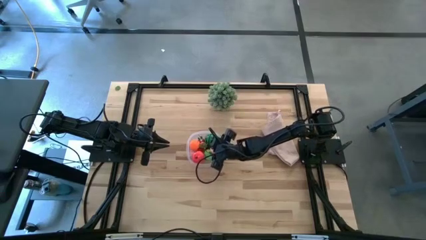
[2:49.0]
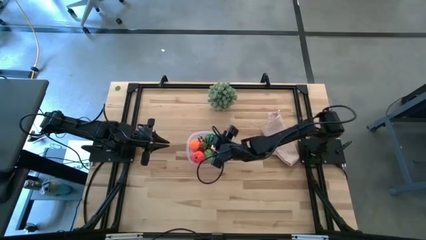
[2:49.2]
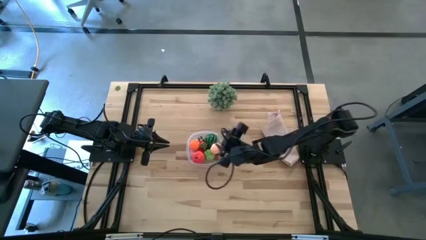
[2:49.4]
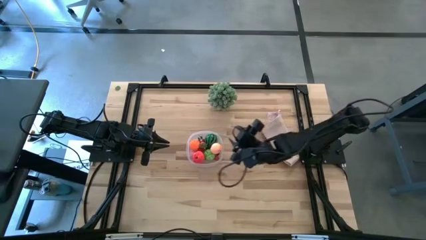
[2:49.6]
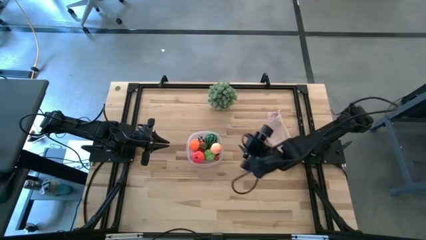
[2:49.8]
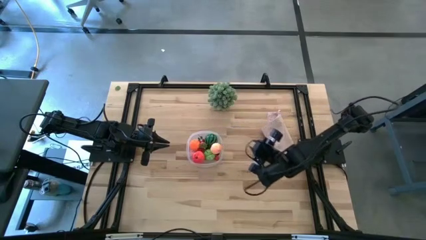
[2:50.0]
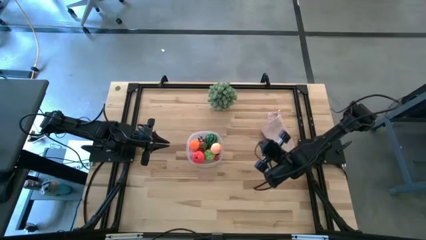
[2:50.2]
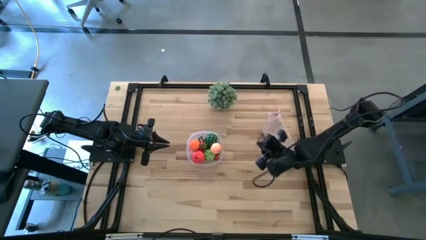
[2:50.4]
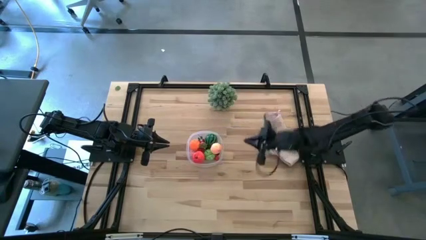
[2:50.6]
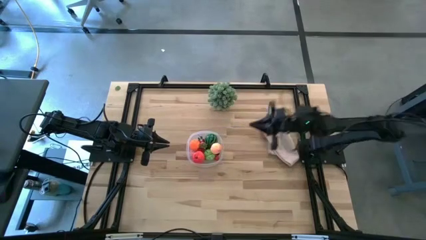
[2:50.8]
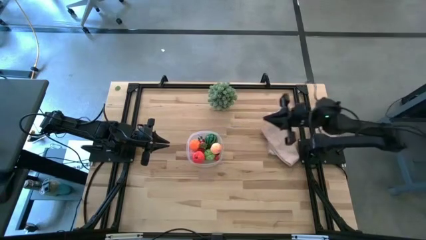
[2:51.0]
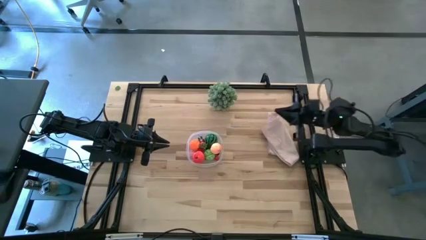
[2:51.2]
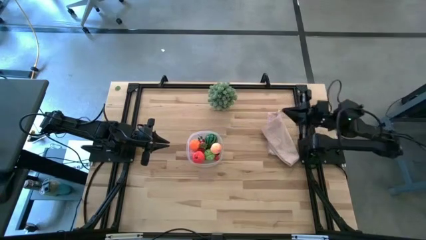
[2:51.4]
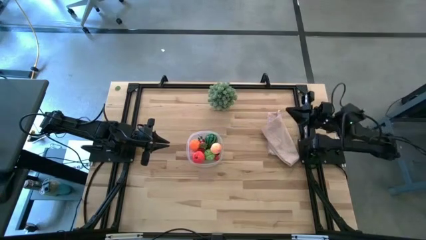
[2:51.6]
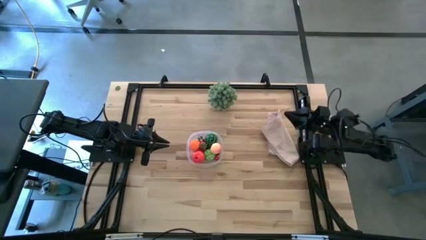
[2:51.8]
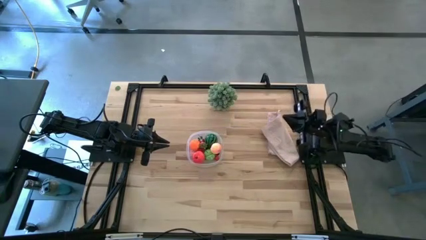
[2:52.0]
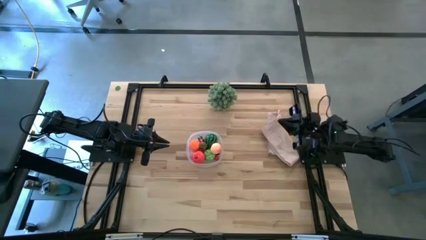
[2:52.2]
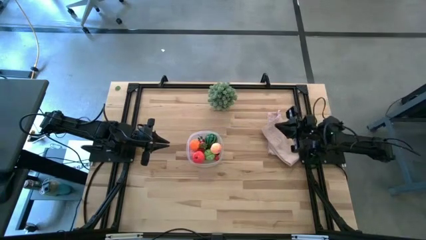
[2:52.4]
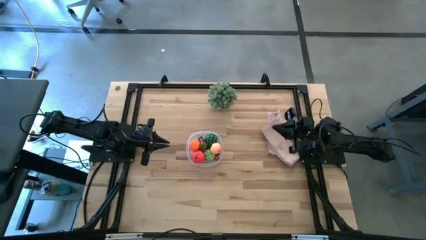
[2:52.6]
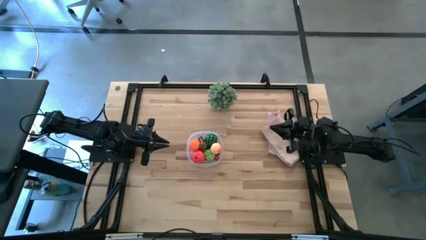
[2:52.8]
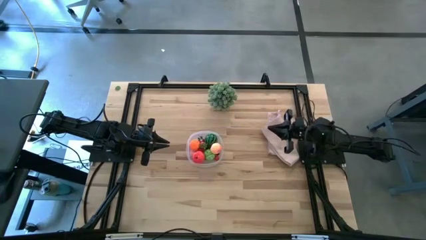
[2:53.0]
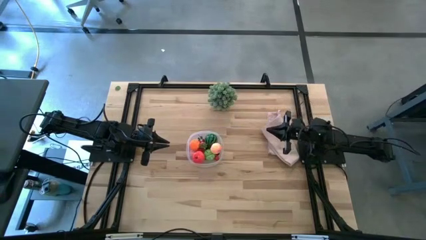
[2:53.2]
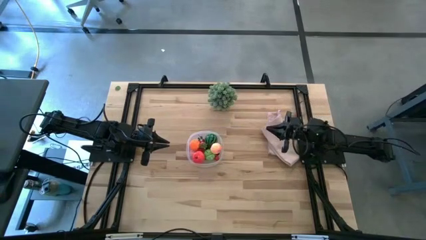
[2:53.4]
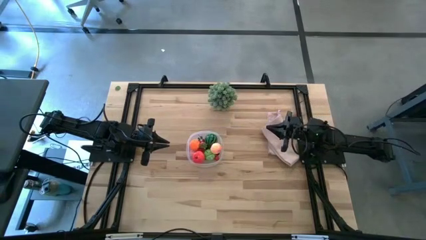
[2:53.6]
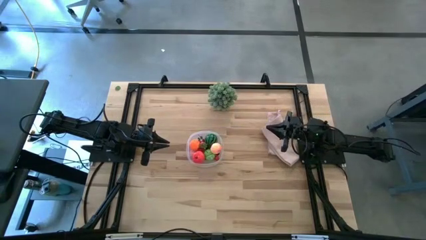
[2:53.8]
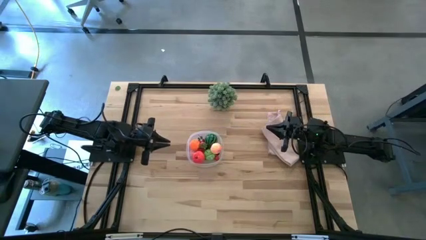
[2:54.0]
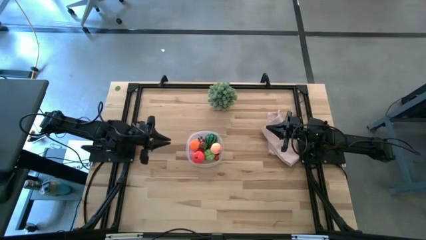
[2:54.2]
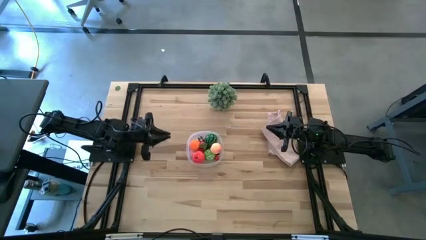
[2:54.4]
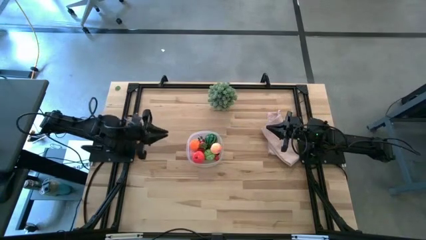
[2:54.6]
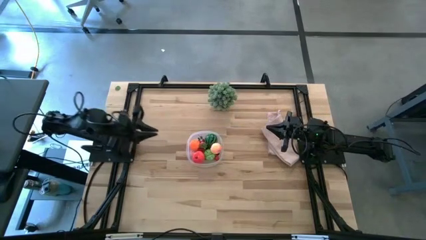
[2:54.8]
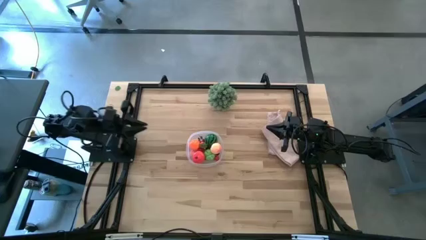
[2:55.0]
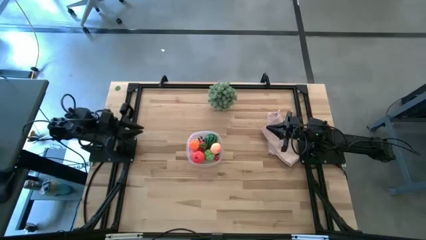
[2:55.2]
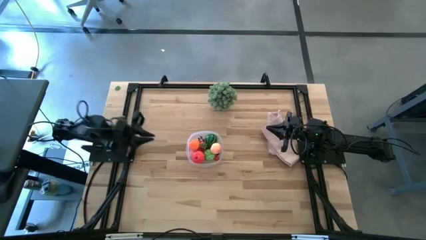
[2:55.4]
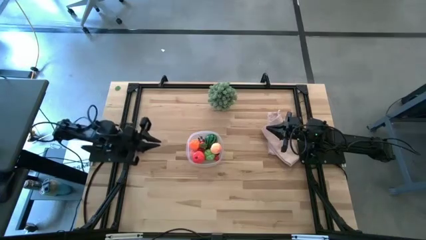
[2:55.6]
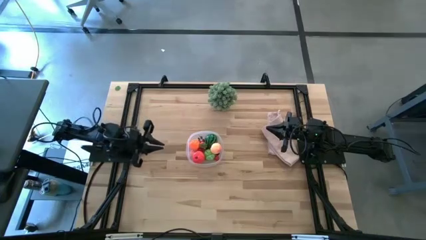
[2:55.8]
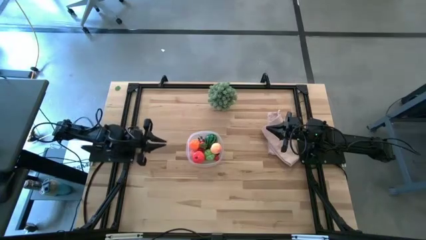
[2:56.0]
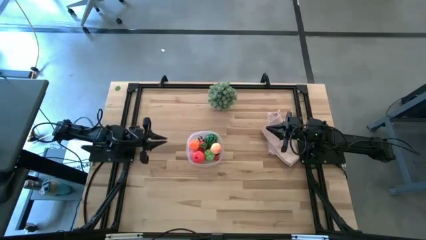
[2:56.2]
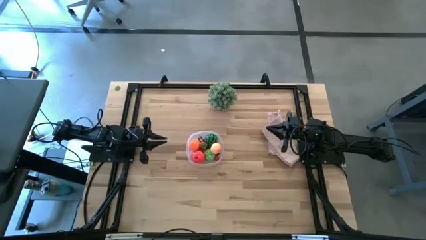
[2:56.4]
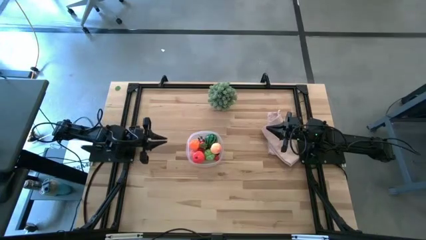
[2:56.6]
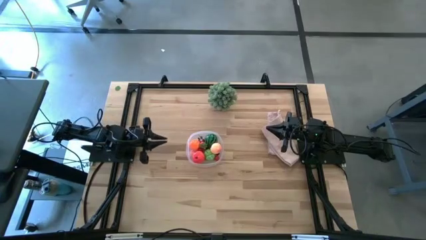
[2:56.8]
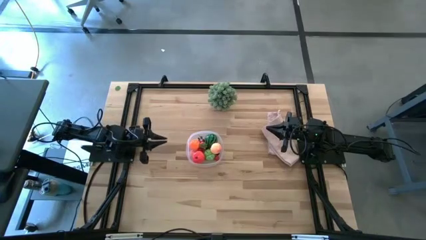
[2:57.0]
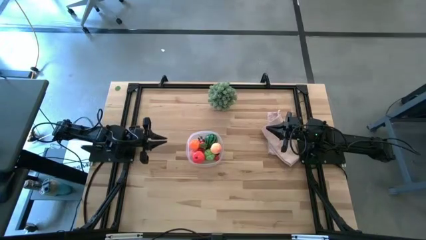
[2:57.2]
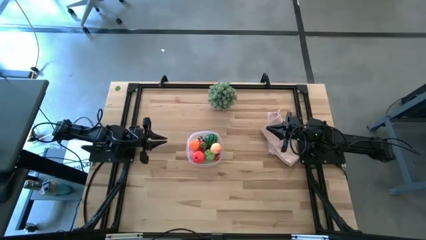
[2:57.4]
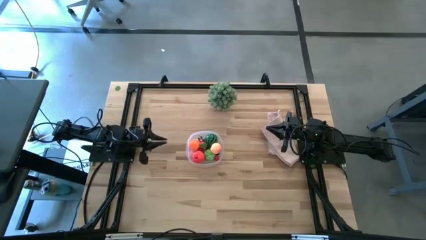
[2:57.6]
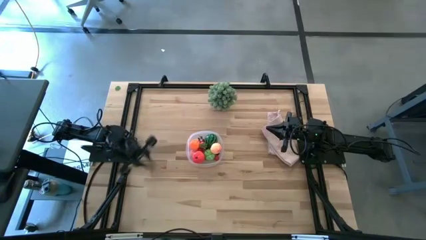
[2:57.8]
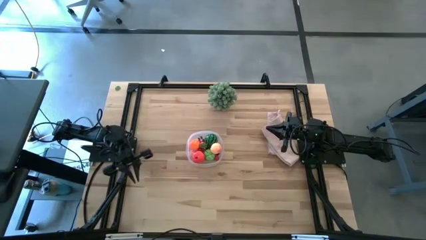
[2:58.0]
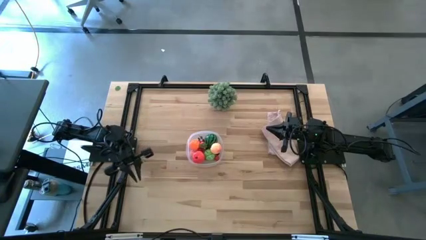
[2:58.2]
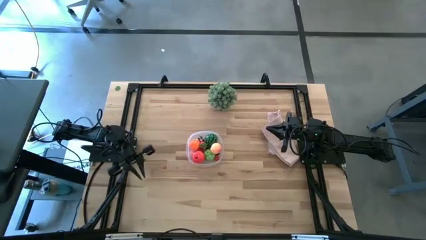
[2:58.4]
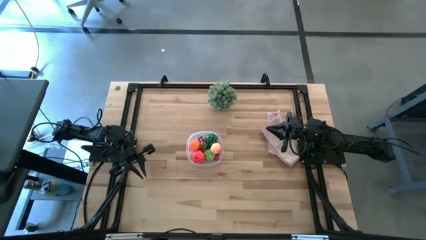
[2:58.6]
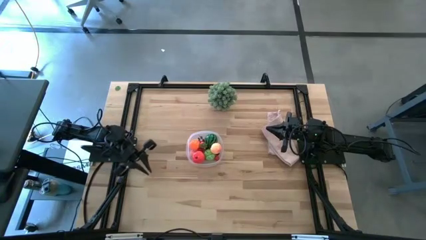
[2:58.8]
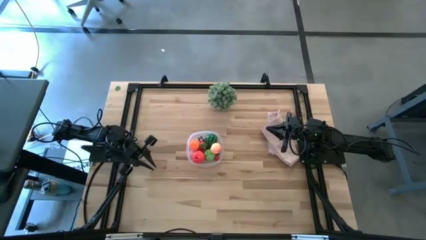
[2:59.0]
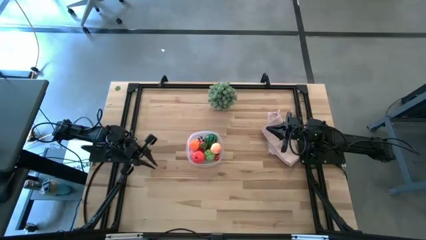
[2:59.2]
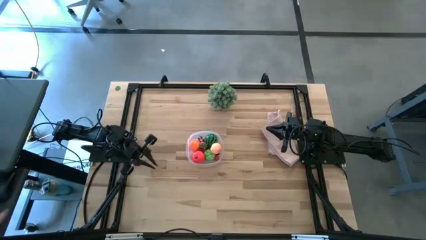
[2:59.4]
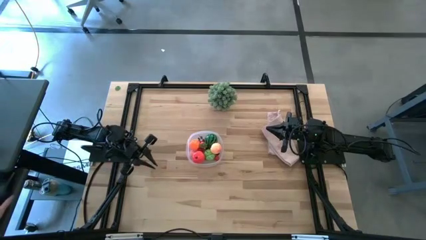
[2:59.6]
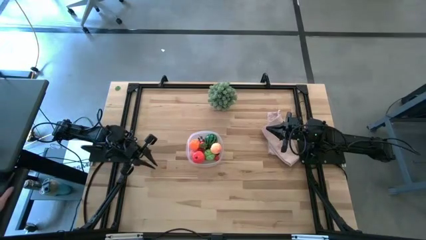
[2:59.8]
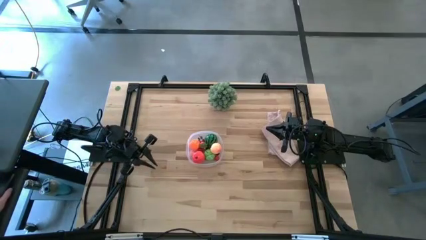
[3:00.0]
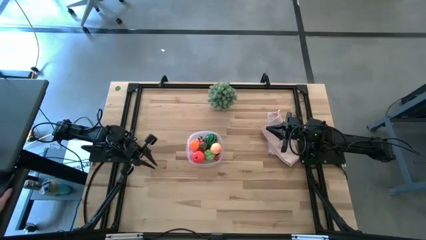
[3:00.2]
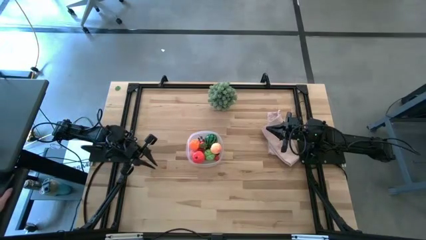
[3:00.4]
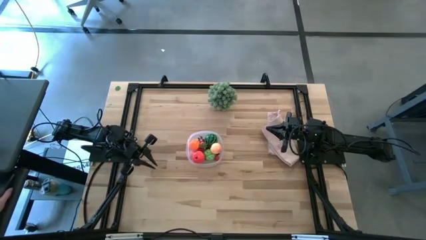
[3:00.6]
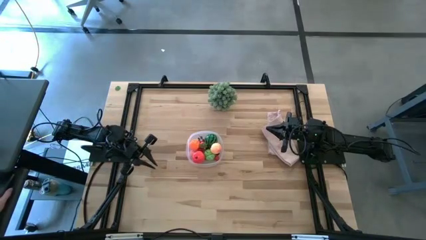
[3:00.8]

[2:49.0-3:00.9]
Task: Pick and placing Produce into tupperware
Return to Home Position

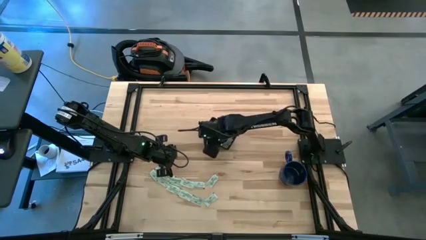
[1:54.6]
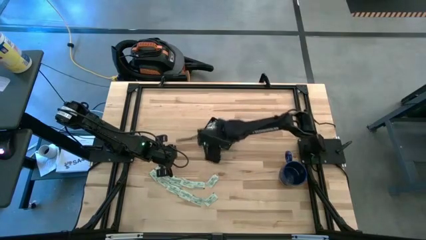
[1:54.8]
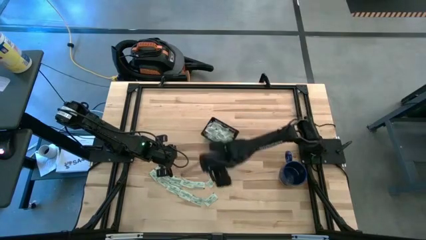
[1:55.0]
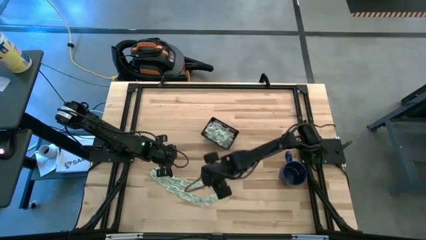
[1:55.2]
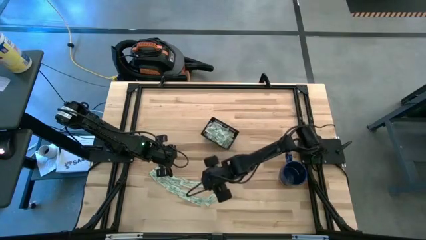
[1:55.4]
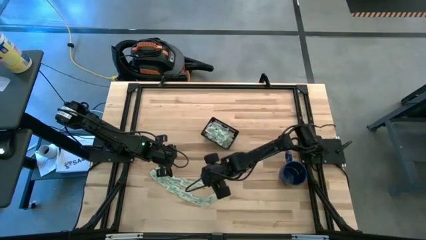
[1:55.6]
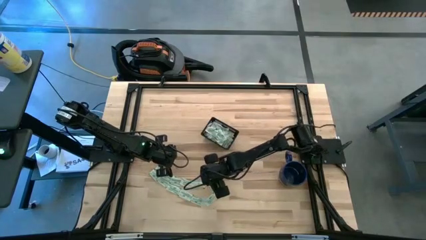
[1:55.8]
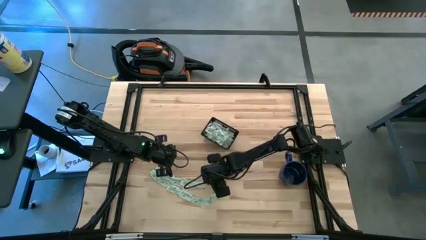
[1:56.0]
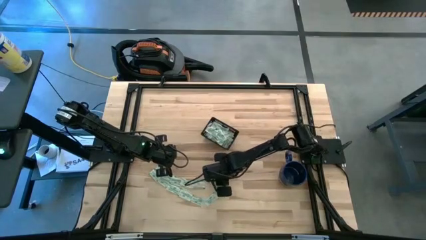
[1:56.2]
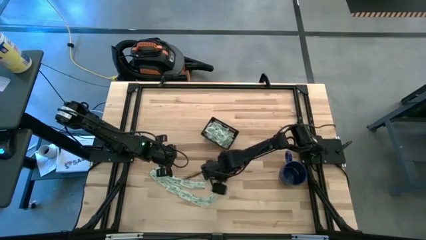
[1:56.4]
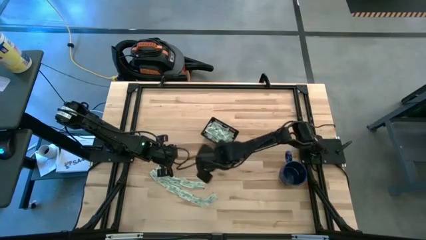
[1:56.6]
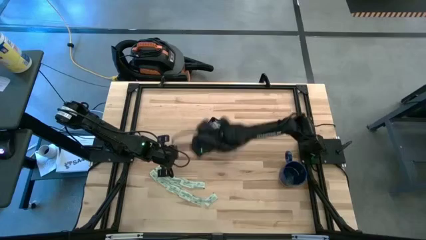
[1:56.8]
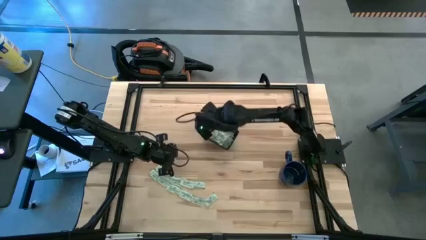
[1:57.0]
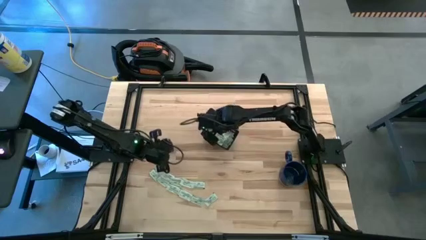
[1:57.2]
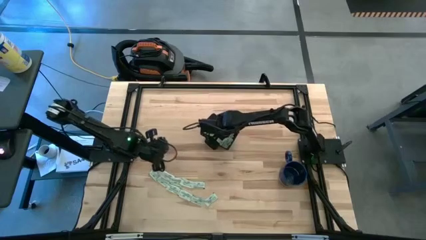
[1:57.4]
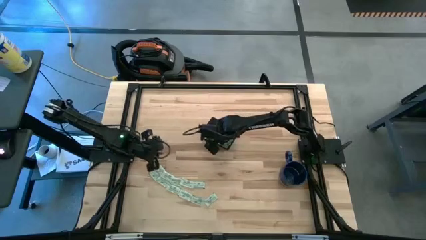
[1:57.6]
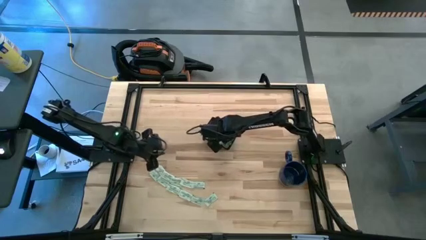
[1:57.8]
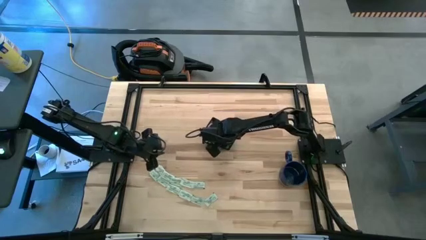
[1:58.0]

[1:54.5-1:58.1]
Task: Pick and place Stevia / Truvia into bins
Put the stevia packet into the black bin

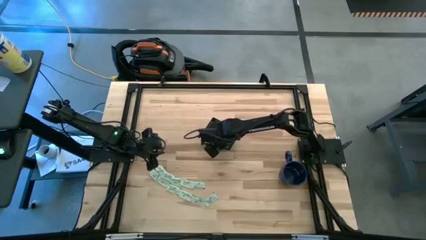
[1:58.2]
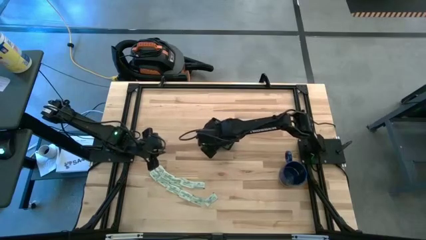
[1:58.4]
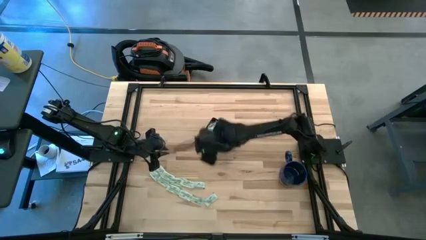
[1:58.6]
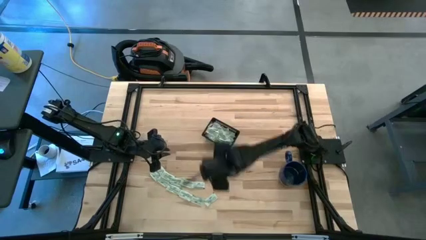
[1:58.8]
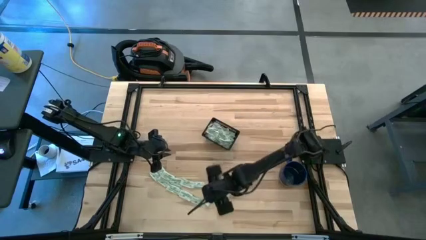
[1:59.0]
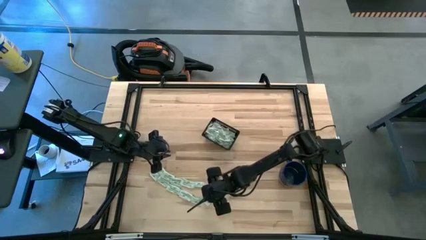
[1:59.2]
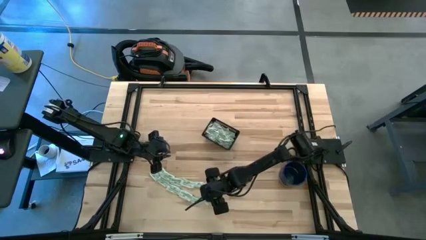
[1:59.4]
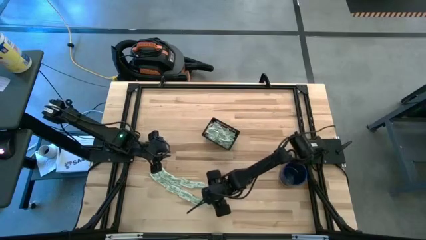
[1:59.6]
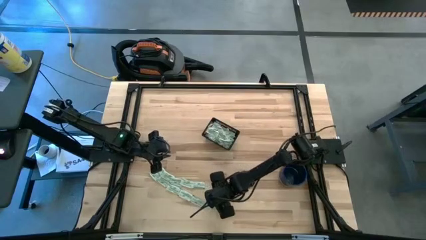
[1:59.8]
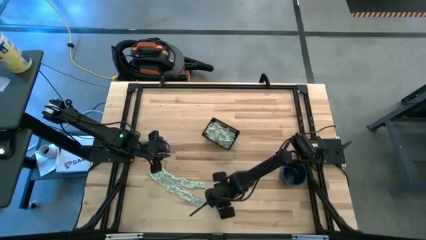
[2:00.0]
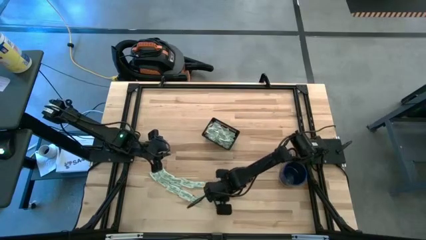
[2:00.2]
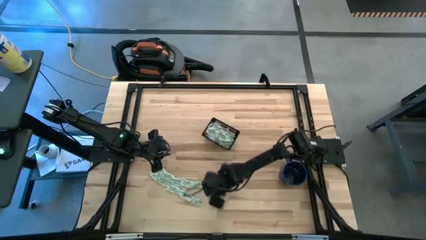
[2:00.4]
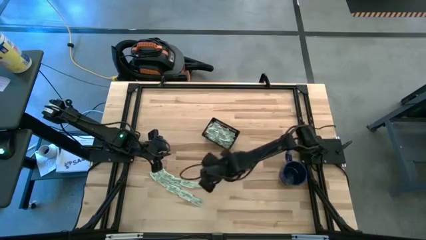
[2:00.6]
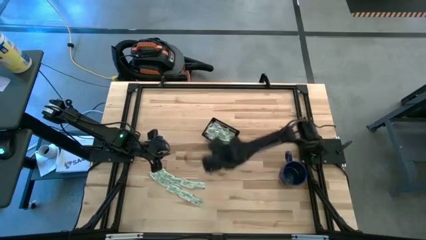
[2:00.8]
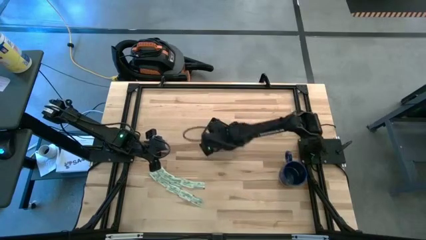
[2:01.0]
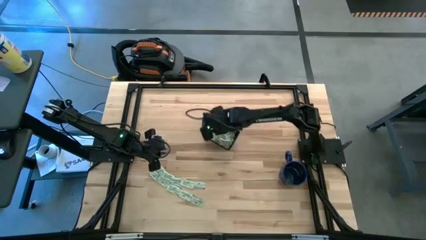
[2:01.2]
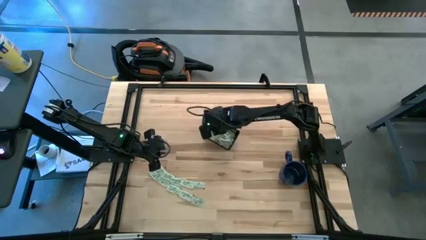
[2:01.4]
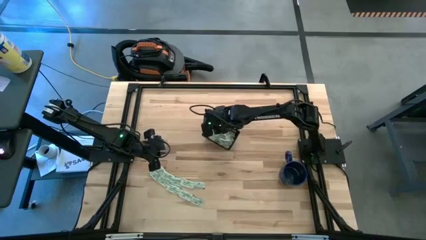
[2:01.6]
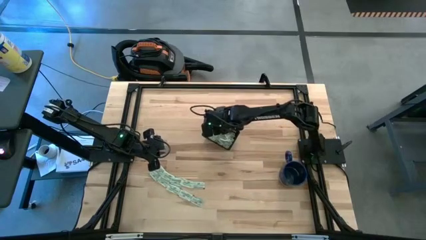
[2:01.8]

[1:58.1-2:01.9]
Put the stevia packet into the black bin
